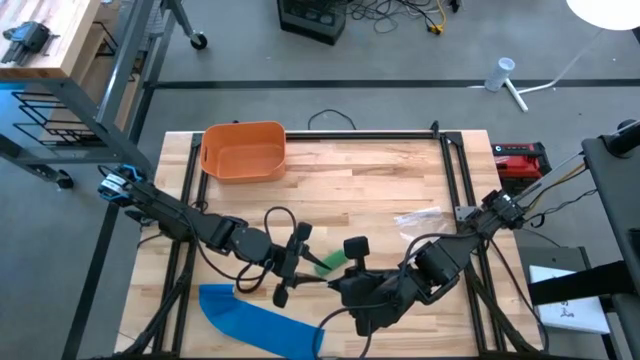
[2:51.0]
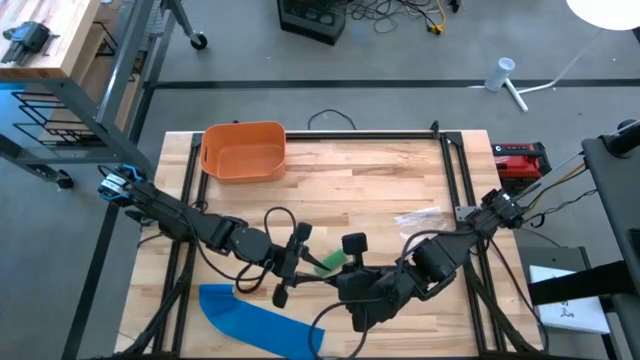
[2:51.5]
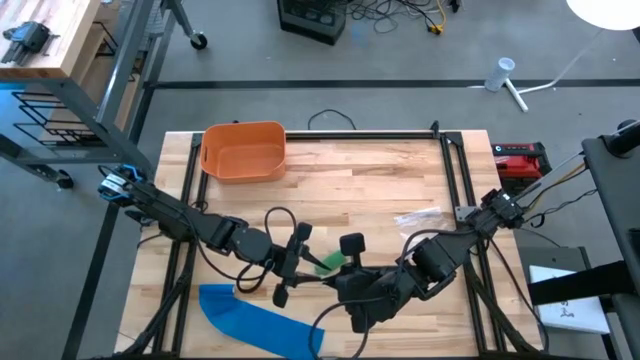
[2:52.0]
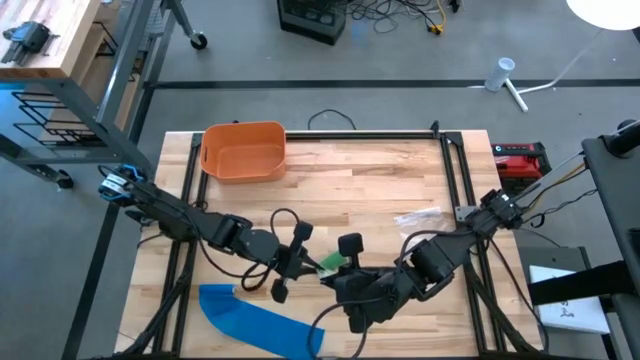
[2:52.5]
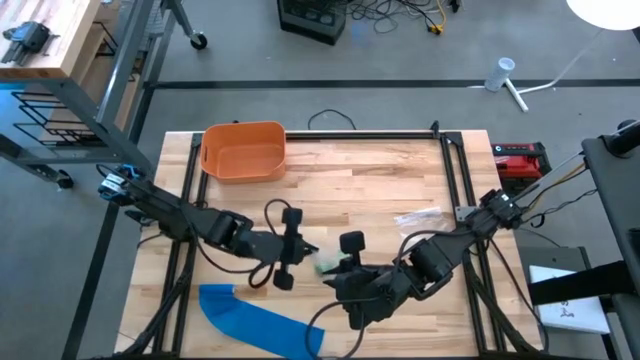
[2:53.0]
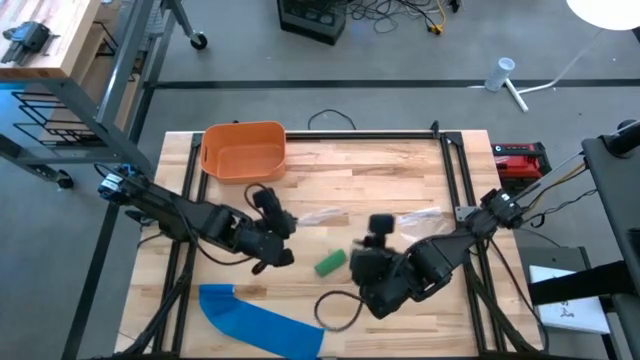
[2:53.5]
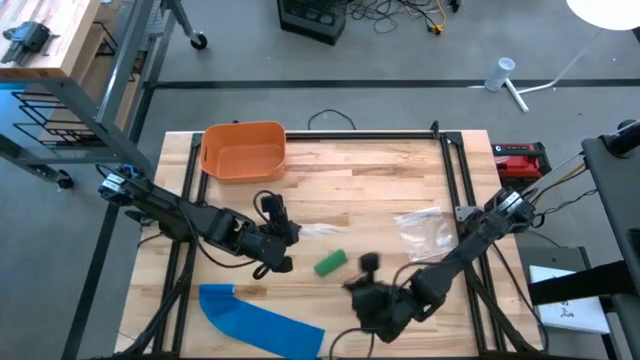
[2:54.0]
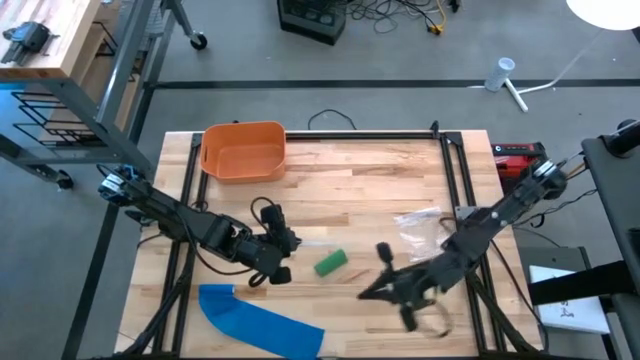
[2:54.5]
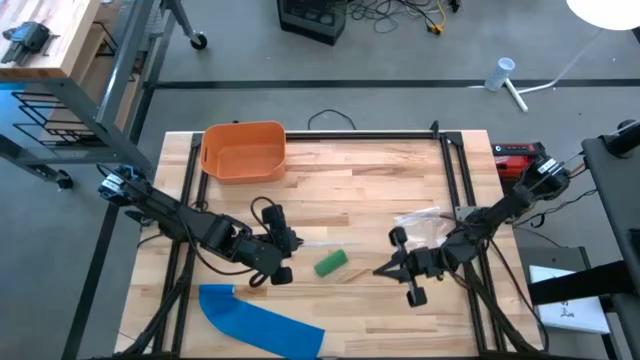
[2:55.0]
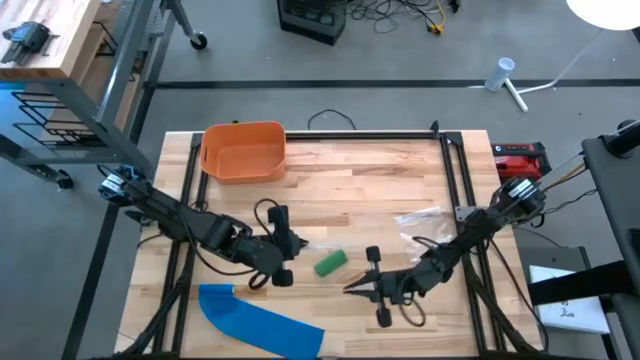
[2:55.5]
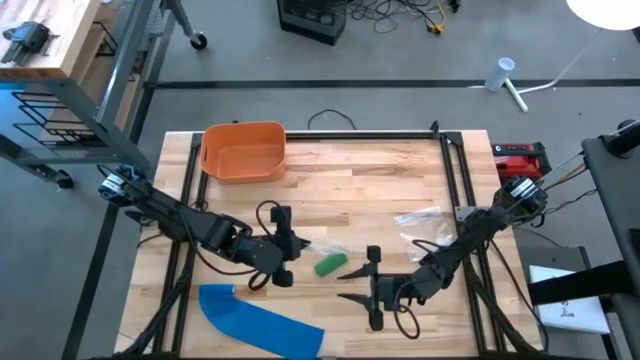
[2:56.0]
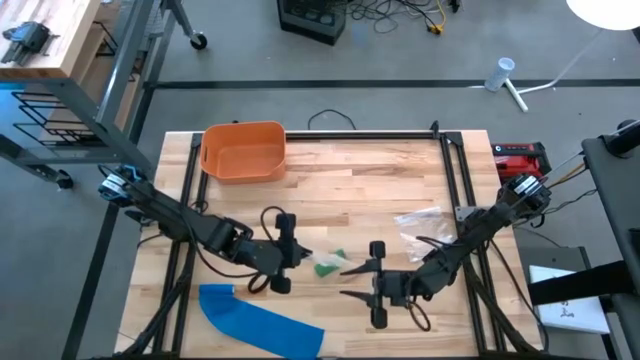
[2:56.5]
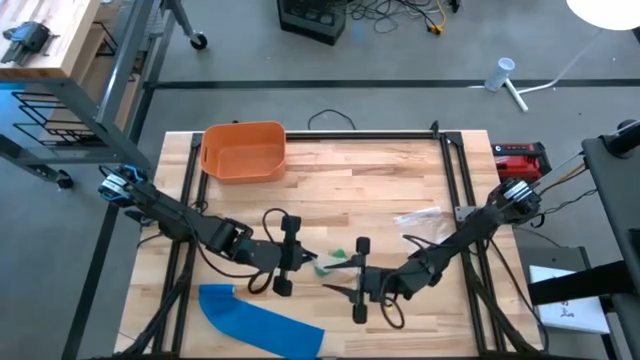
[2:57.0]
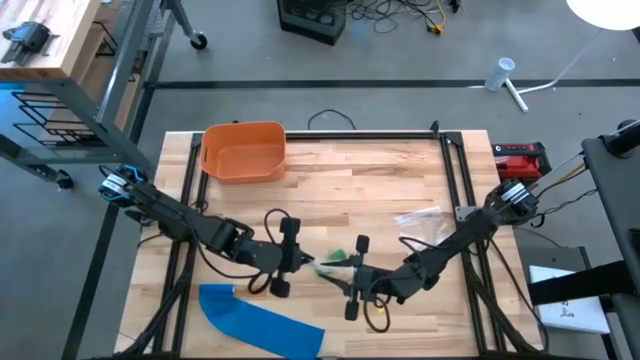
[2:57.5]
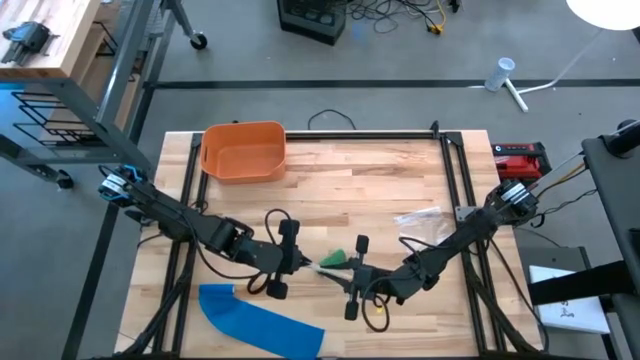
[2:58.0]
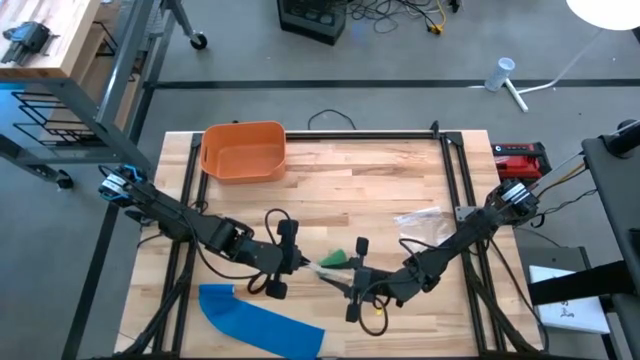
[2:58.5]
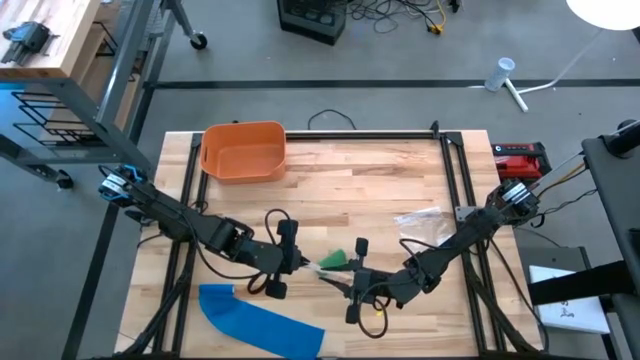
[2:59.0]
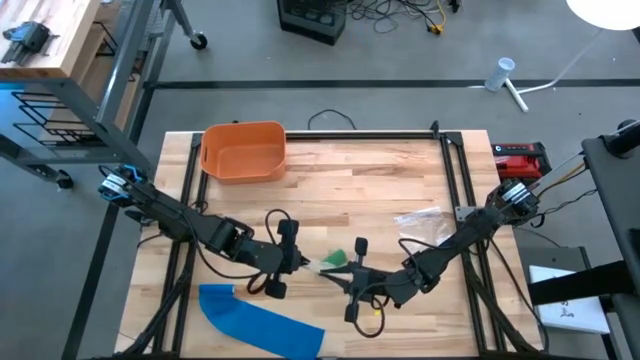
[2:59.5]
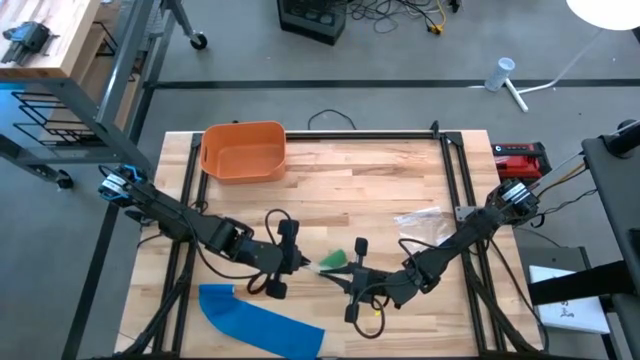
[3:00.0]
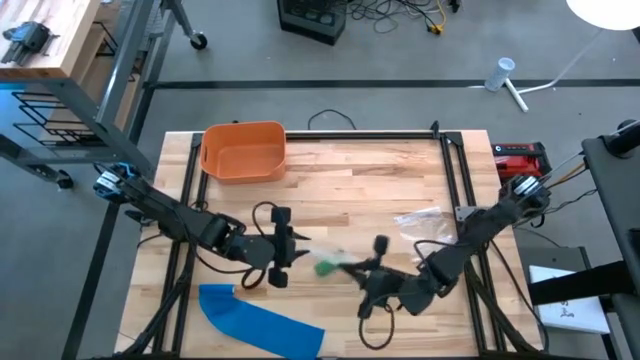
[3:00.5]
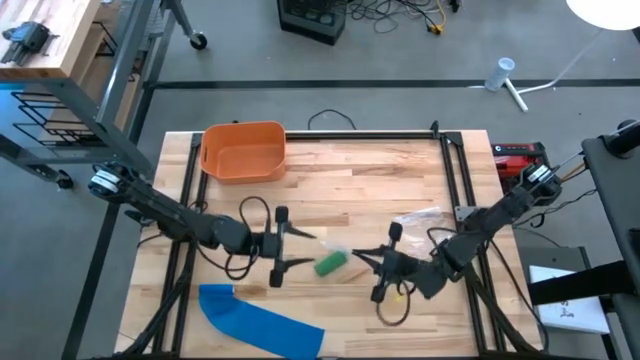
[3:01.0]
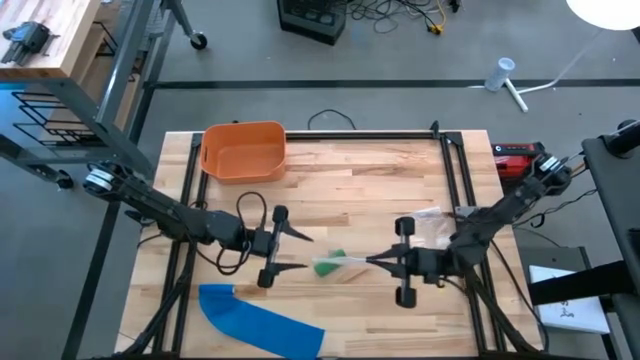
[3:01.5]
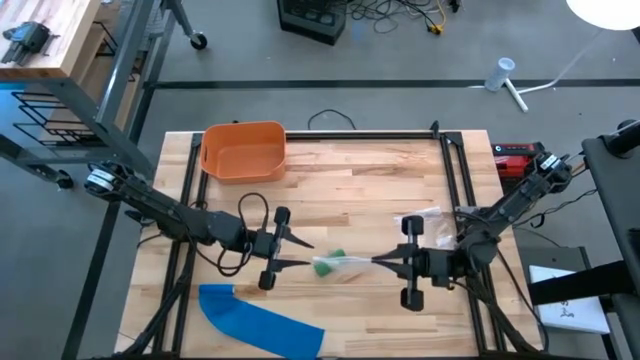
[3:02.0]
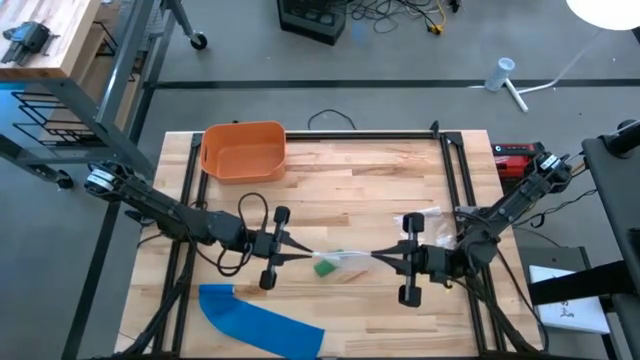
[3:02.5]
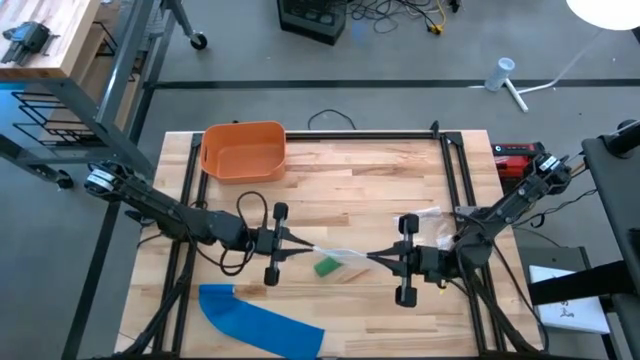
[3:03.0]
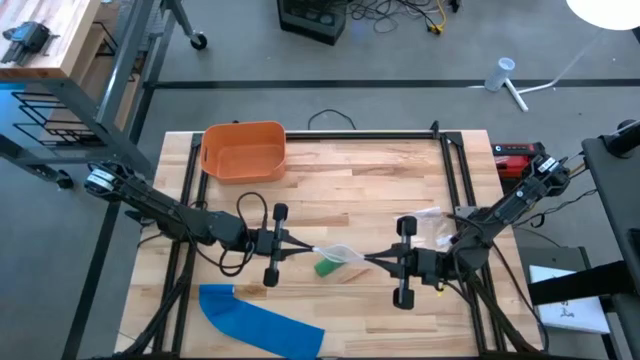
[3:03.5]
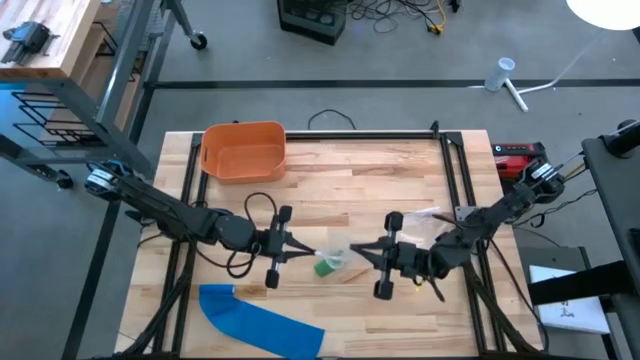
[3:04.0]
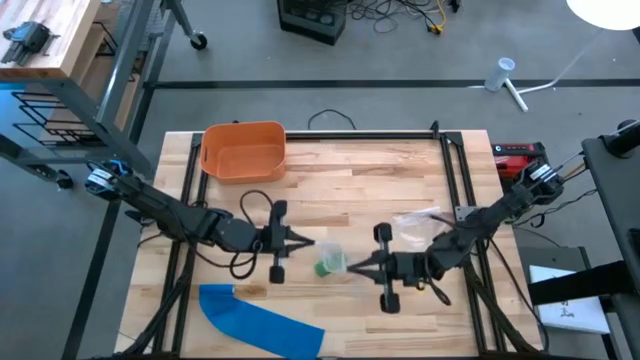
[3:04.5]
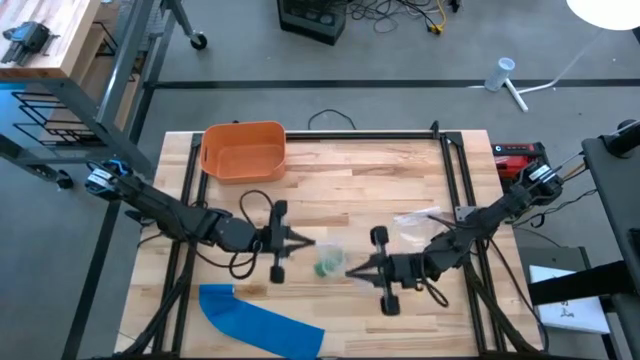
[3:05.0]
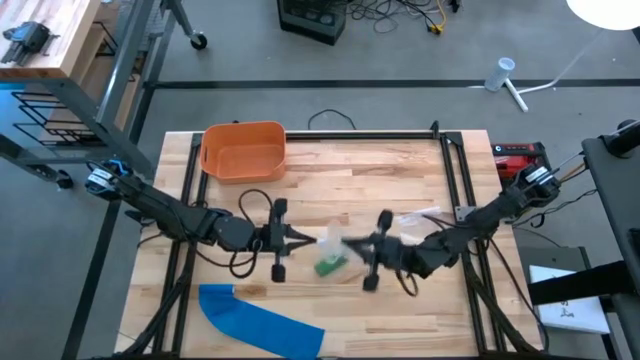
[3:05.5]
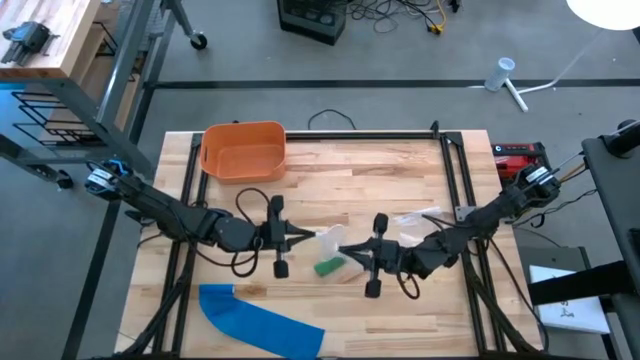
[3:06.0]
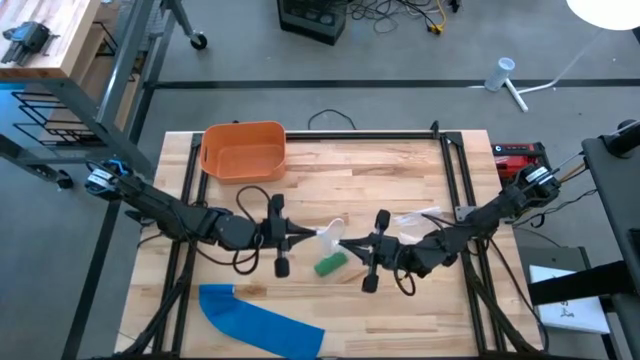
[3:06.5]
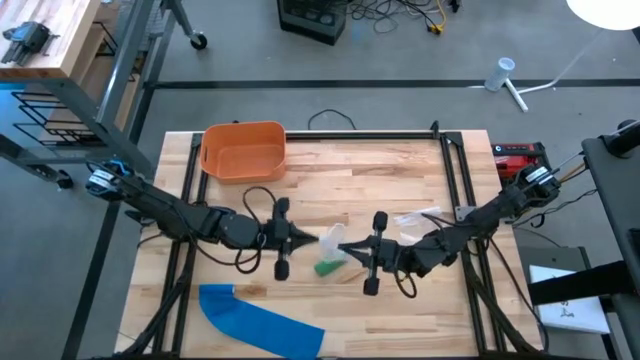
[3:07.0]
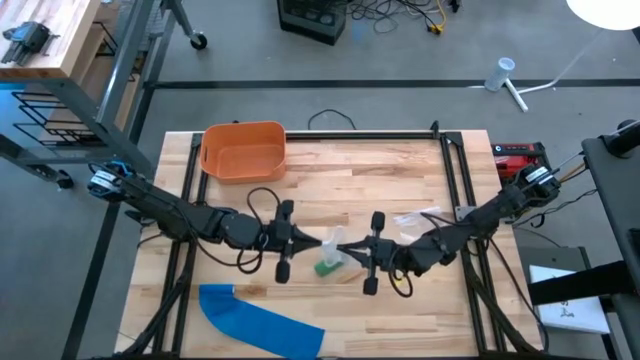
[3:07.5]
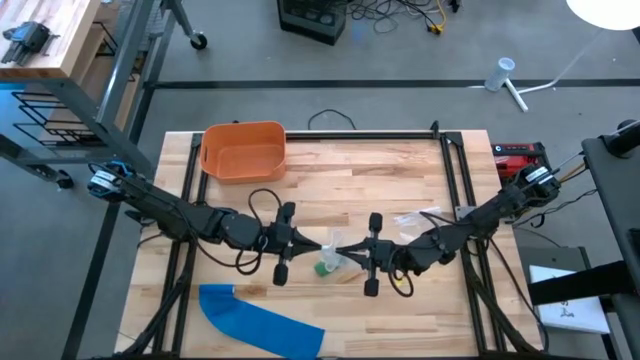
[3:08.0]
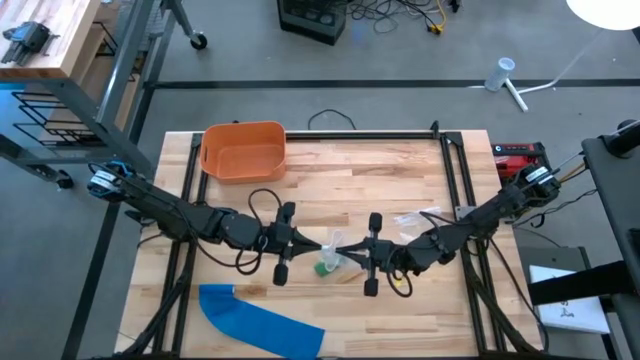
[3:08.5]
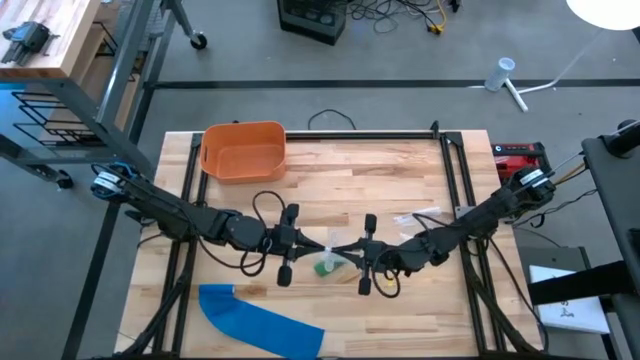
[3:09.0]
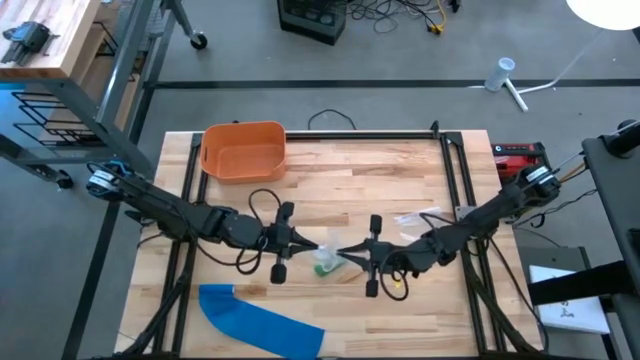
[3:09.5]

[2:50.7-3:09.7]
Task: Roll bandage
Open the top transparent zip bag

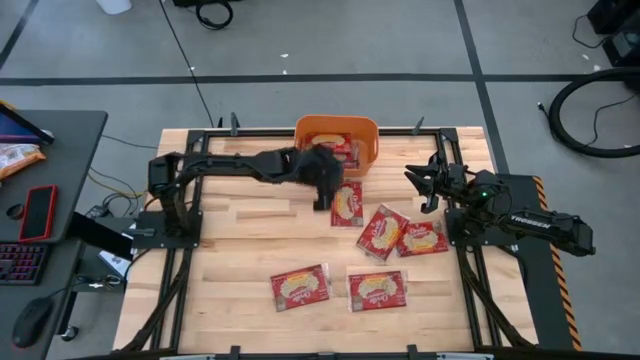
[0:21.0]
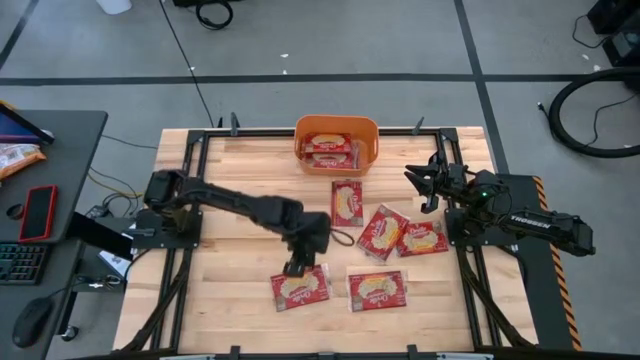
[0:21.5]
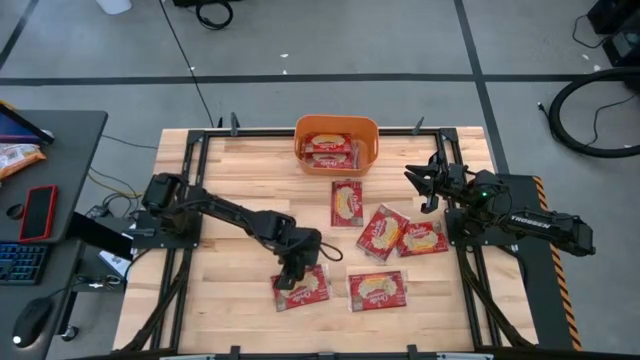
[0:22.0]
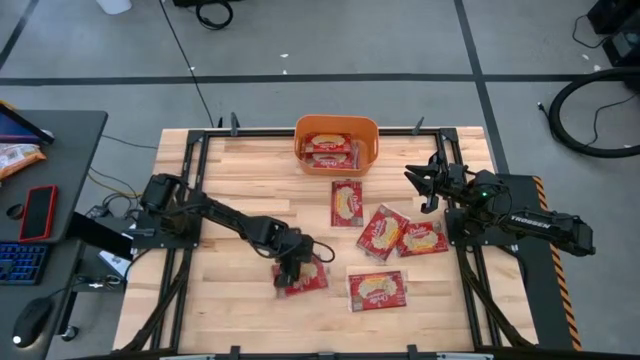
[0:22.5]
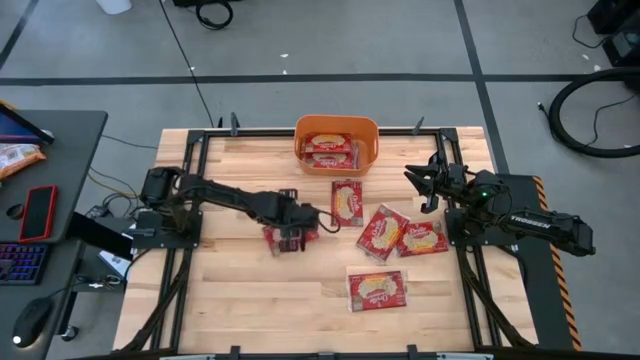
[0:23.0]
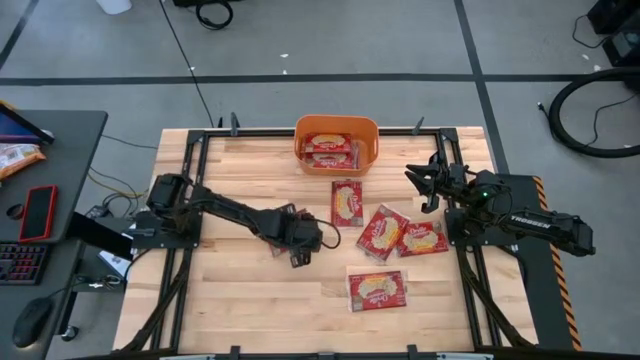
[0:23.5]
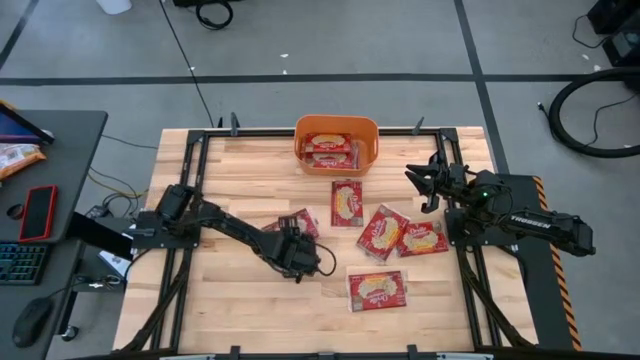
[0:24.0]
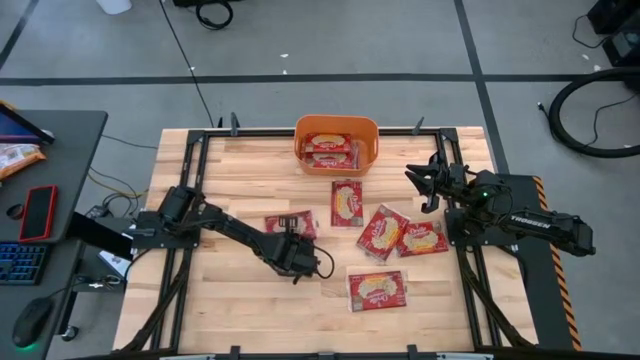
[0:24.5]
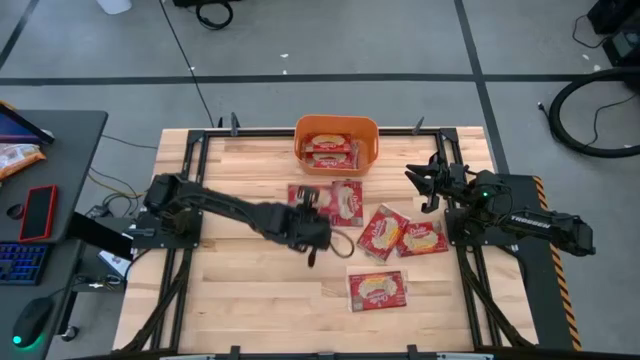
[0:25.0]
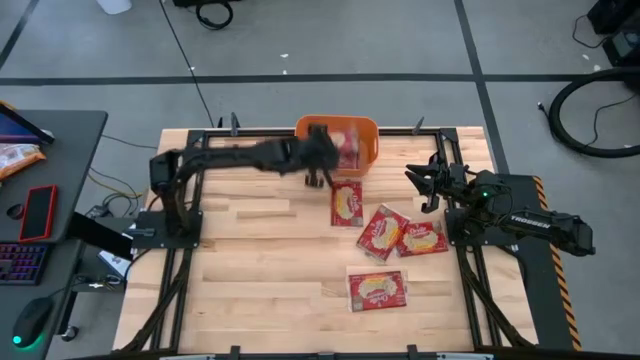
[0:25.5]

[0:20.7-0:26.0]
Task: Sort popcorn bags into baskets
Put the red popcorn bag into the orange bin
